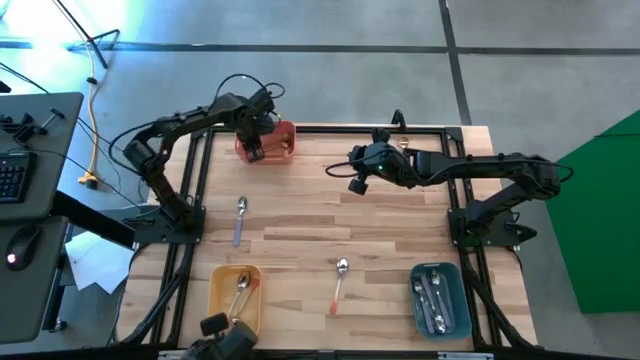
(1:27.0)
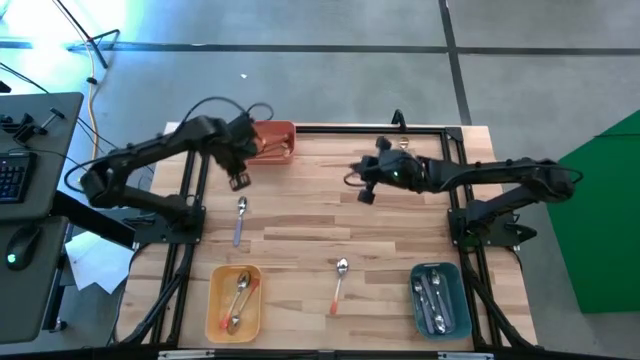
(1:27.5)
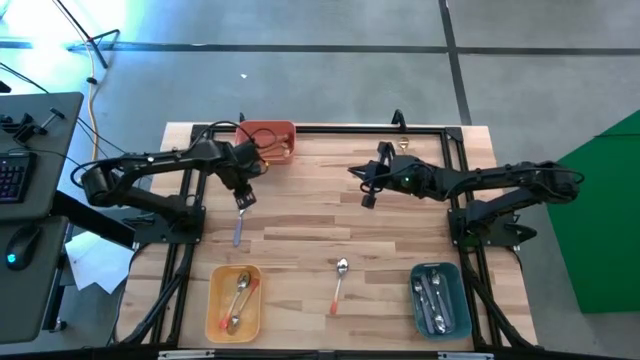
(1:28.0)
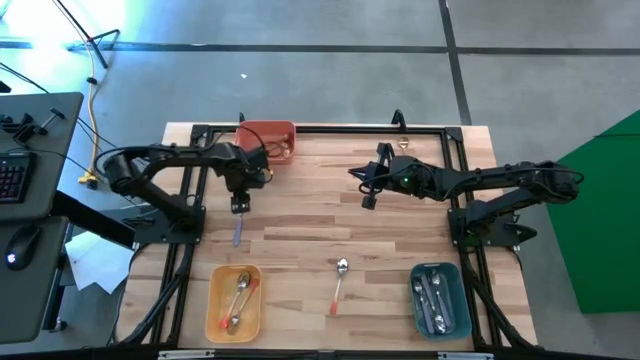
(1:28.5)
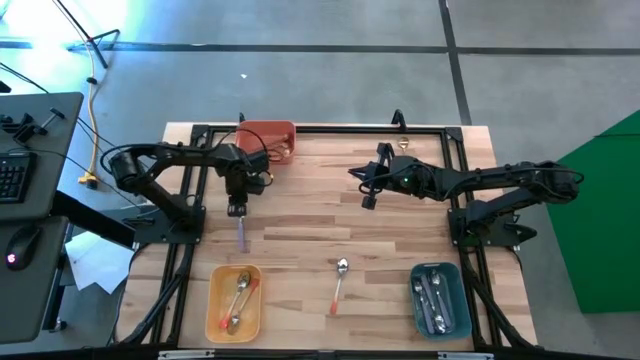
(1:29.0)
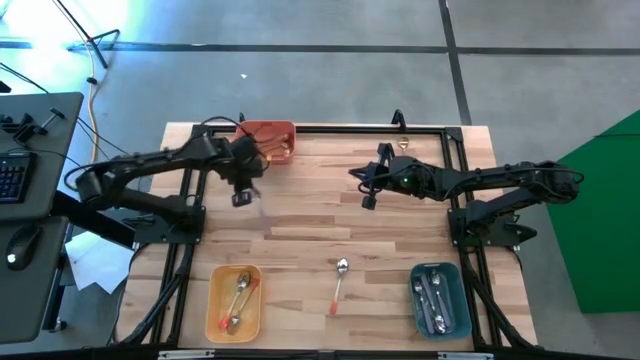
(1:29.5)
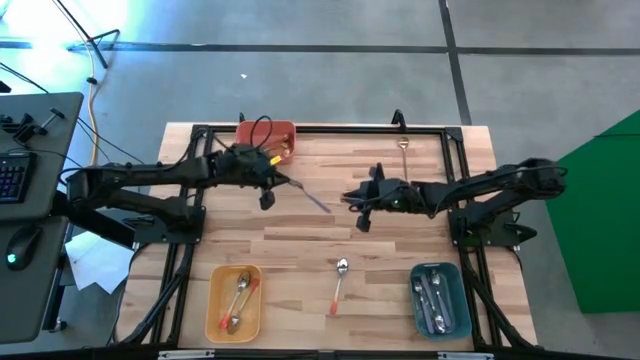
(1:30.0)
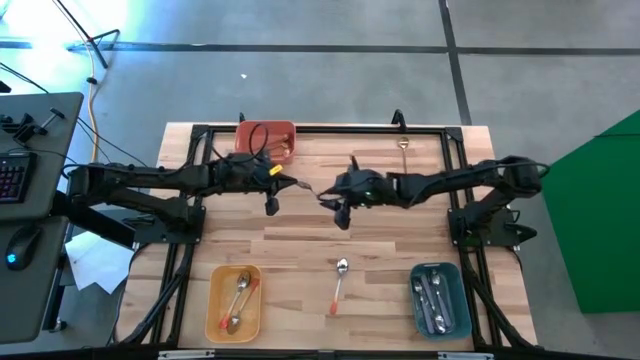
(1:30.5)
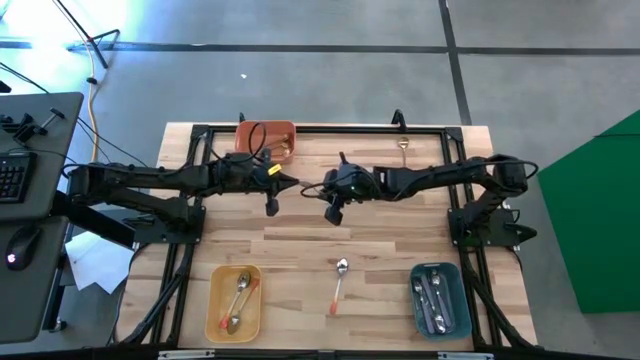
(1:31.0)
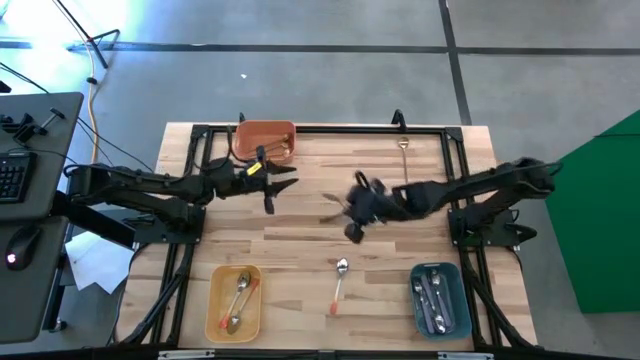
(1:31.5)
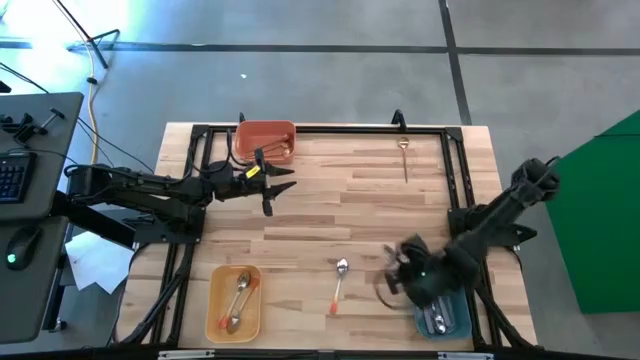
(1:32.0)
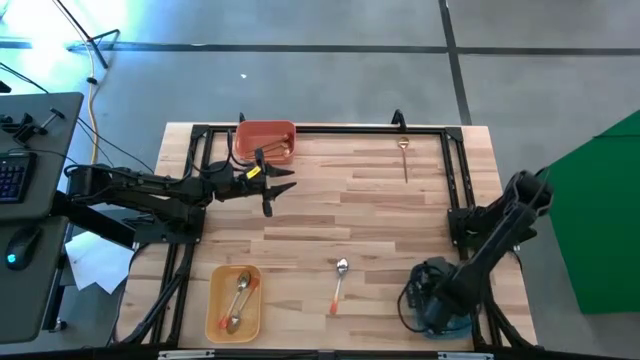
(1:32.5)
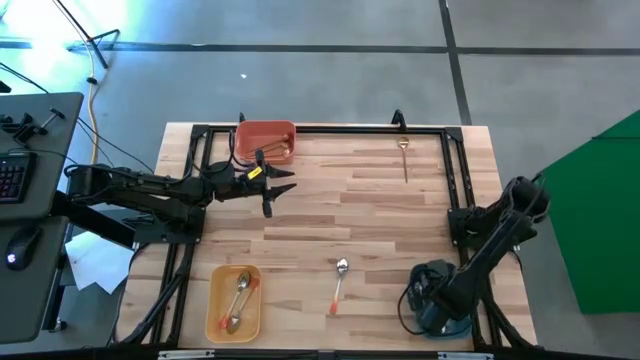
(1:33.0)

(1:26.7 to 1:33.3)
Task: Sort silverware by color (type)
Put the purple spoon into the green bin

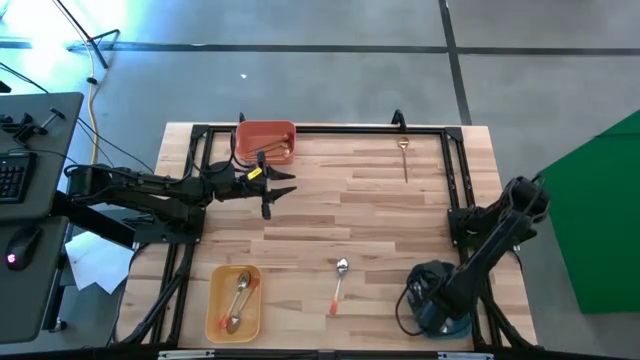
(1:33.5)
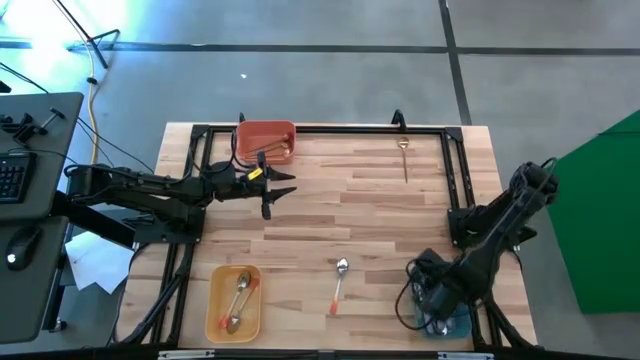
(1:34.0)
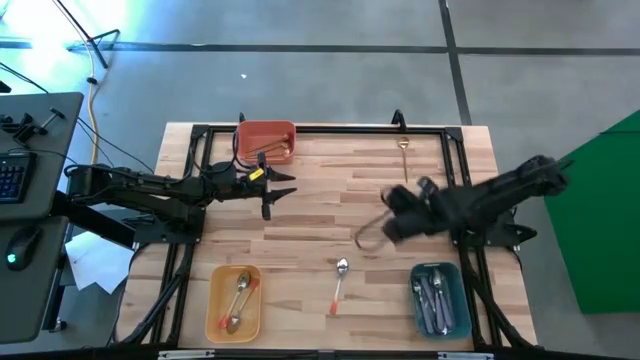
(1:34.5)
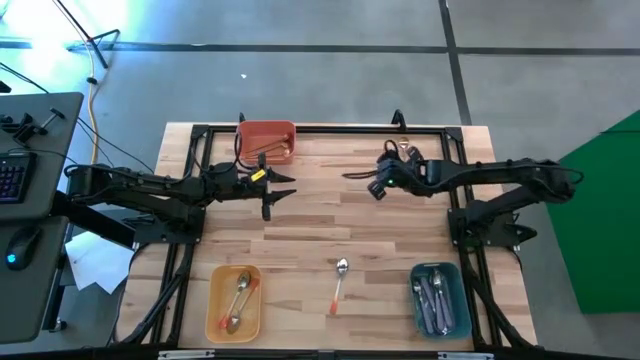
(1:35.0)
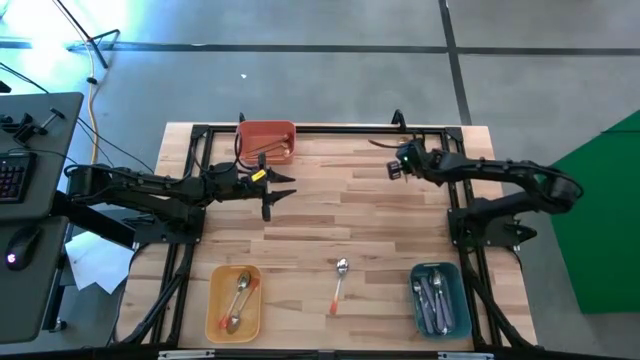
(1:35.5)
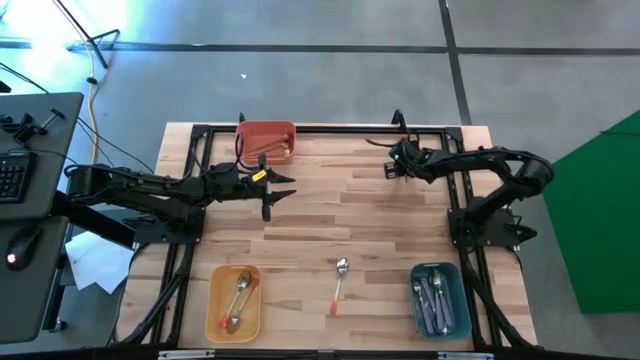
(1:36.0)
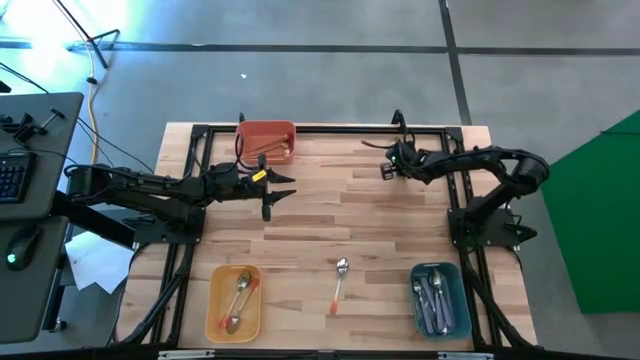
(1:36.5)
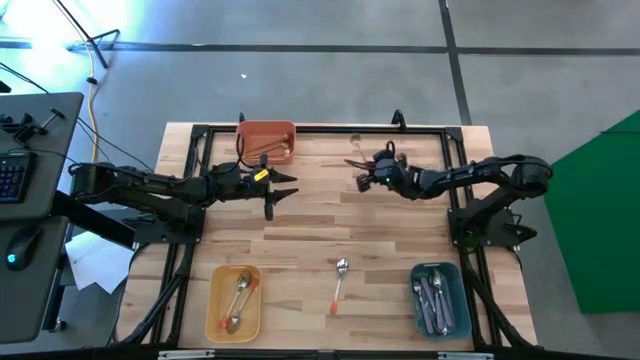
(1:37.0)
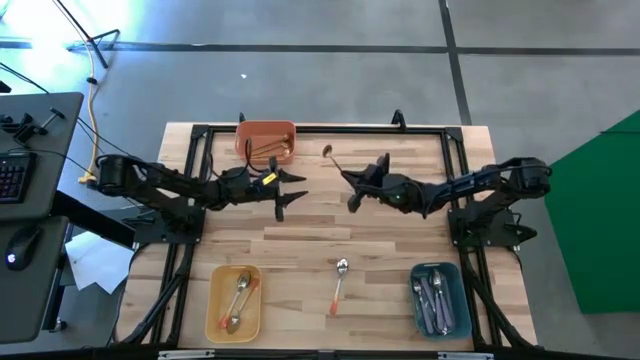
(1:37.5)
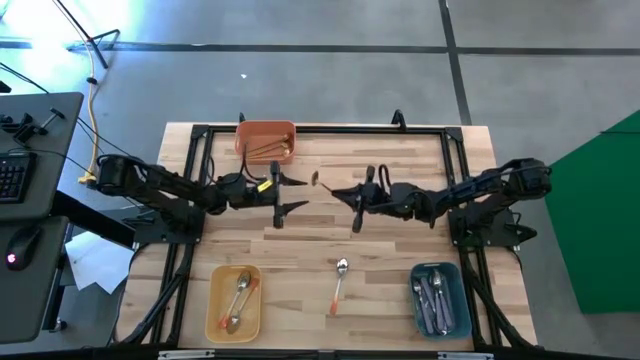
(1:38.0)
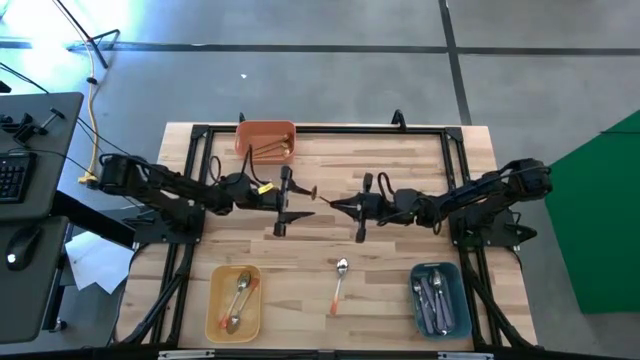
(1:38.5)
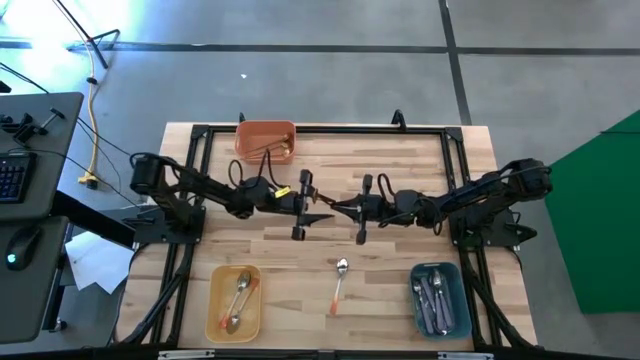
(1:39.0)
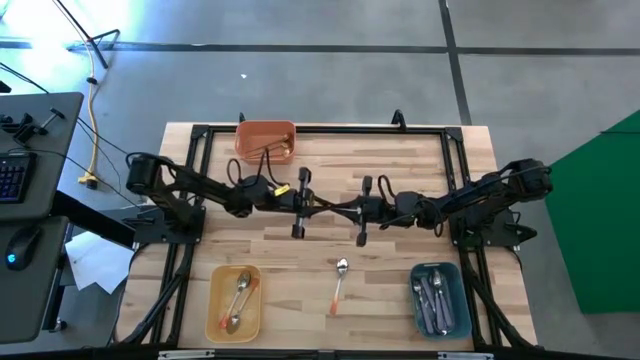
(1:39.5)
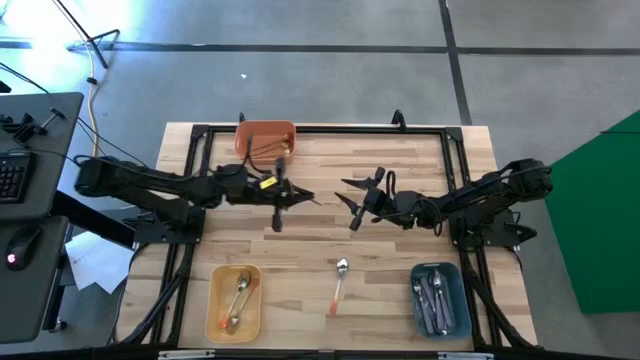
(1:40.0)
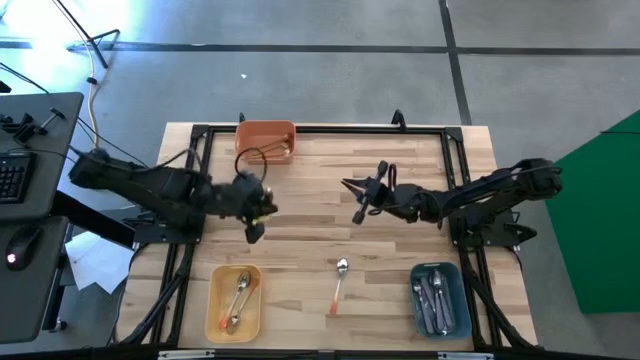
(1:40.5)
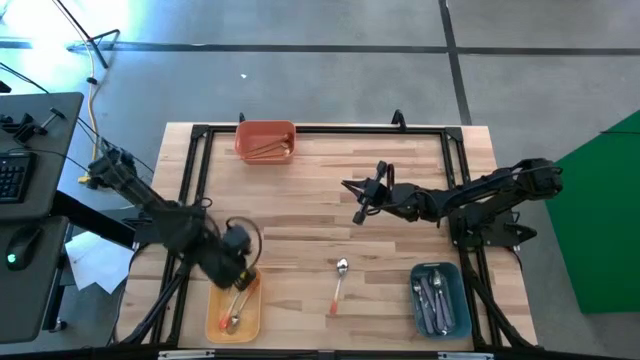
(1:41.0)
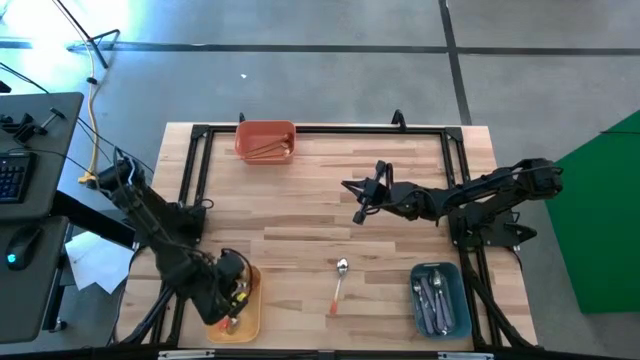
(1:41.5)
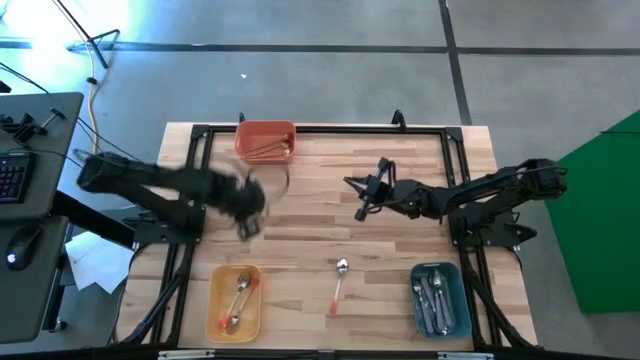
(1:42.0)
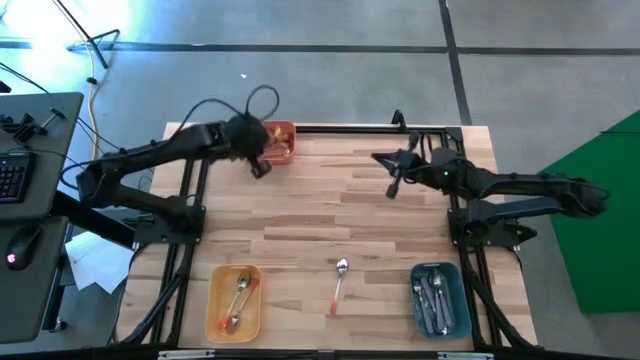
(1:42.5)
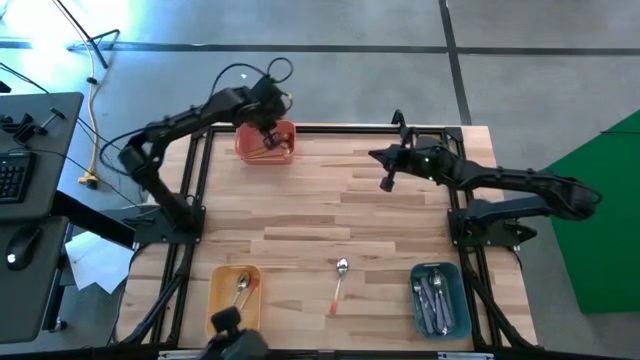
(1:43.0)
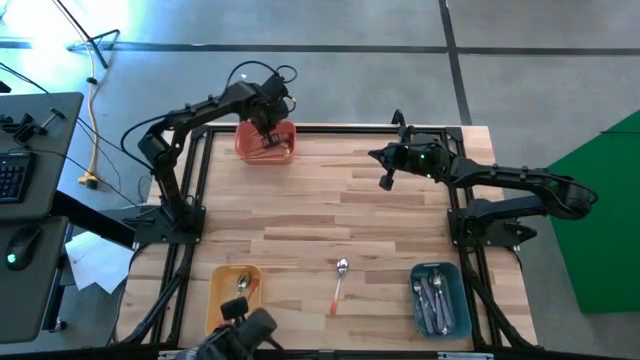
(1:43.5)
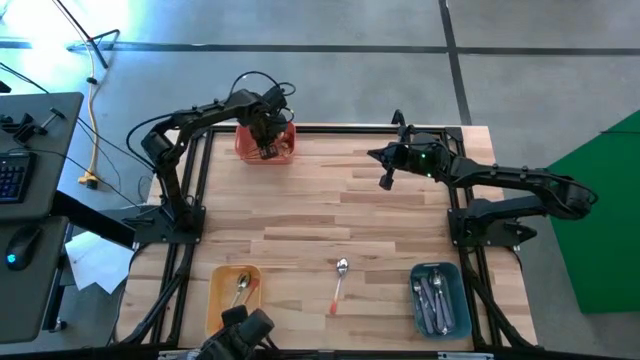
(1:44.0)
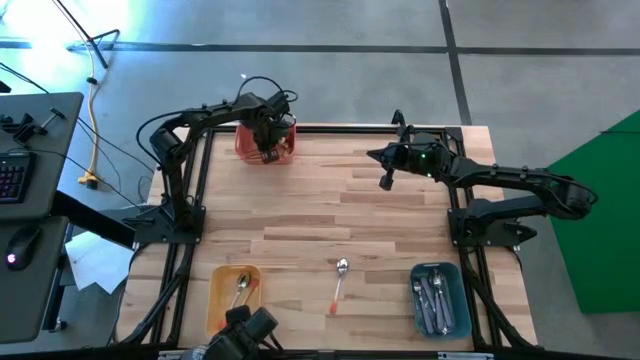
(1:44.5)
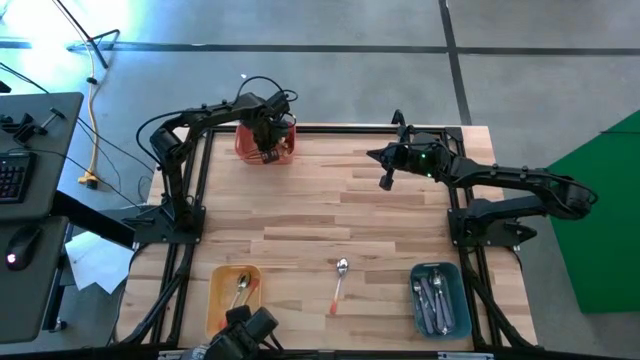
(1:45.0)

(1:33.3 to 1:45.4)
Put the gold spoon into the orange bin

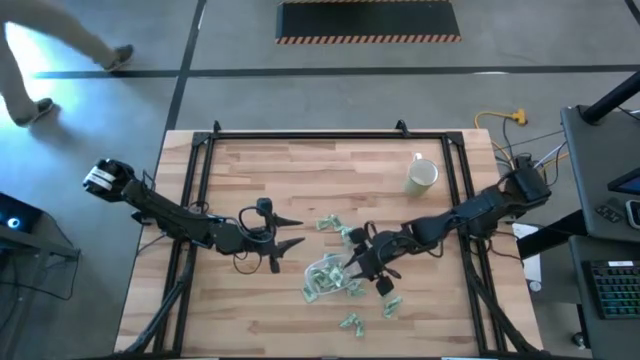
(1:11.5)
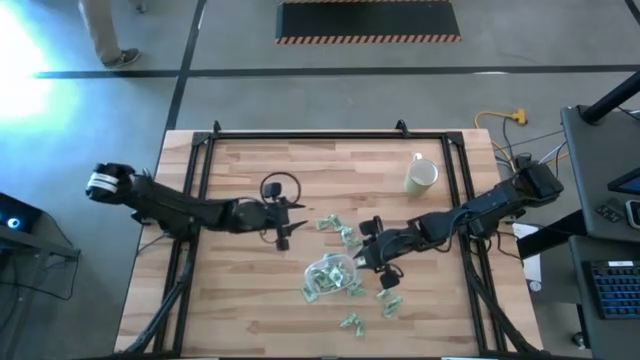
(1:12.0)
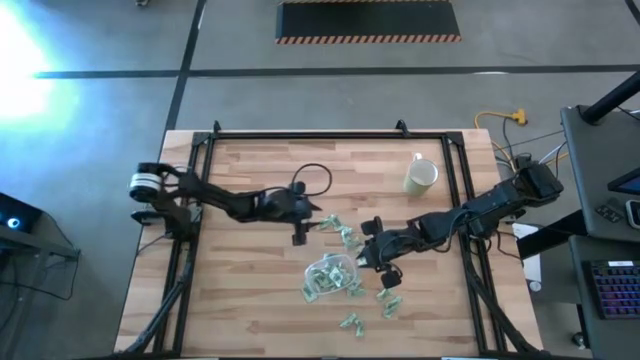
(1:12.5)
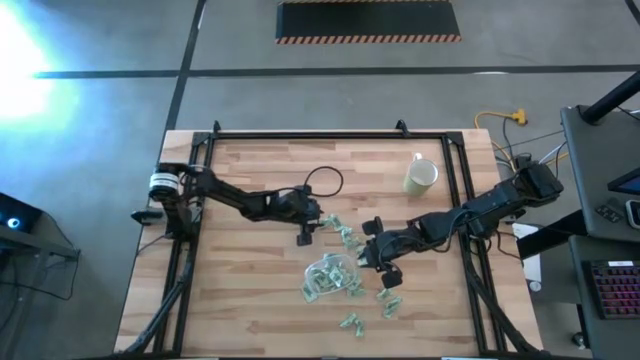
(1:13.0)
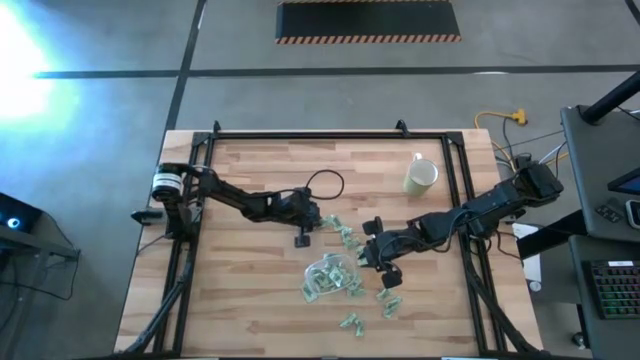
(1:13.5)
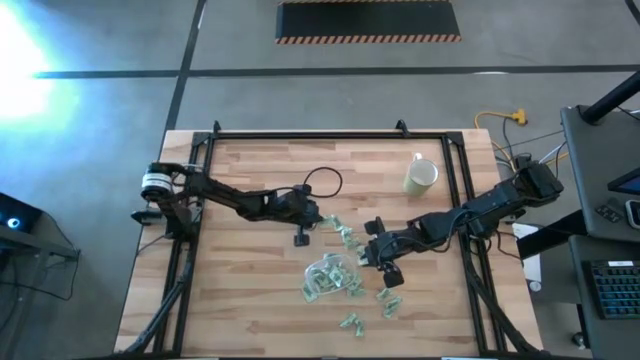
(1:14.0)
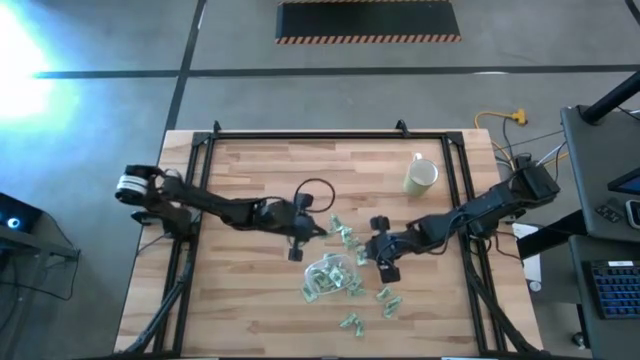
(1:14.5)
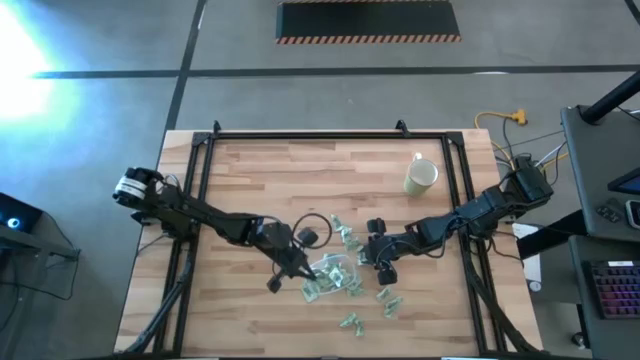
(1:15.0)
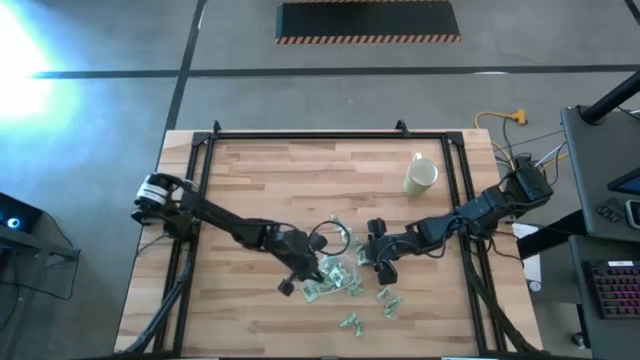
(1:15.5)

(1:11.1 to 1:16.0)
Task: Pick and place items into bin
Put the Stevia packet into the transparent bin
